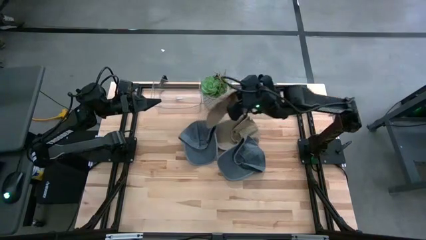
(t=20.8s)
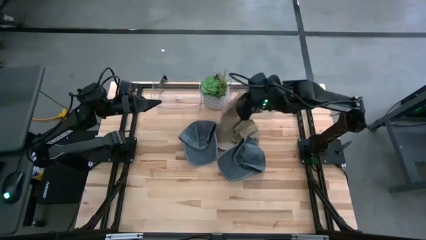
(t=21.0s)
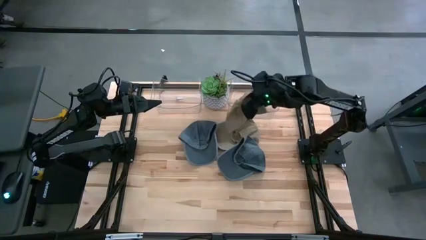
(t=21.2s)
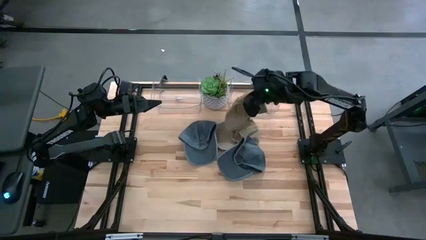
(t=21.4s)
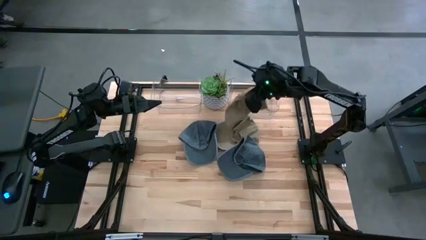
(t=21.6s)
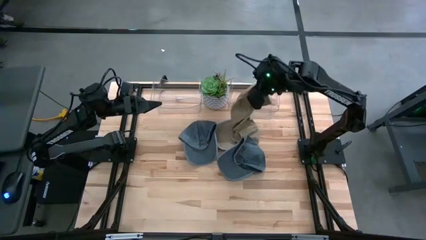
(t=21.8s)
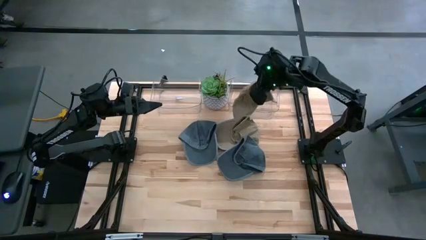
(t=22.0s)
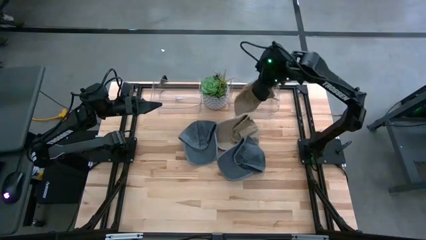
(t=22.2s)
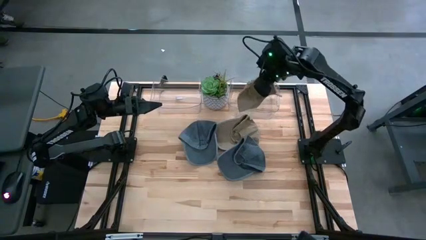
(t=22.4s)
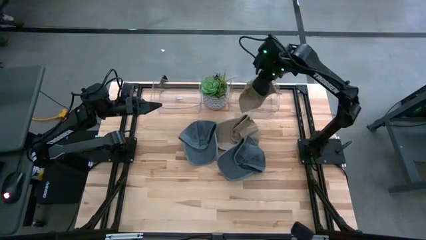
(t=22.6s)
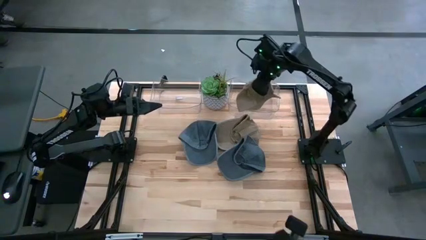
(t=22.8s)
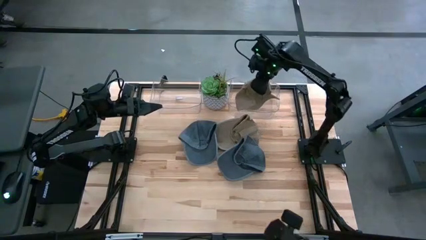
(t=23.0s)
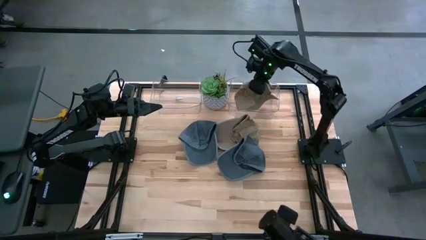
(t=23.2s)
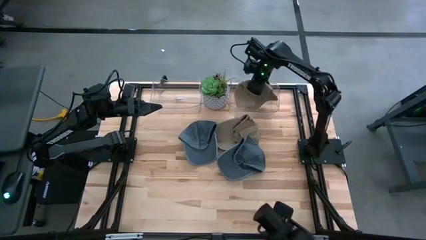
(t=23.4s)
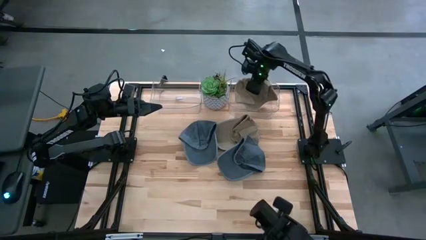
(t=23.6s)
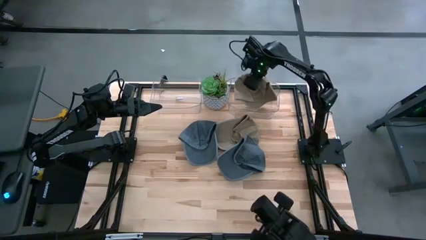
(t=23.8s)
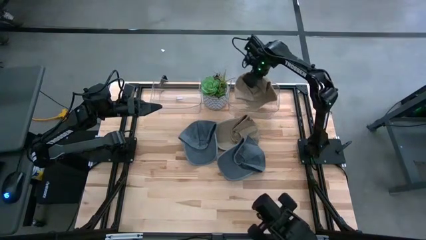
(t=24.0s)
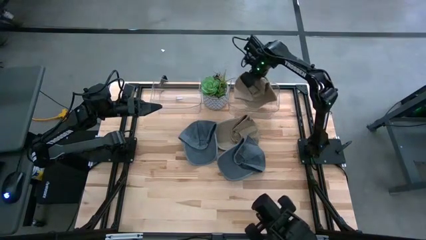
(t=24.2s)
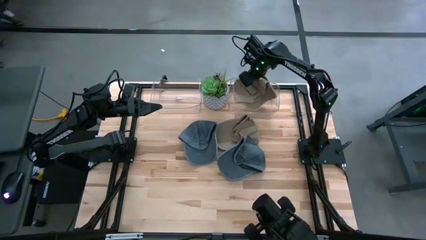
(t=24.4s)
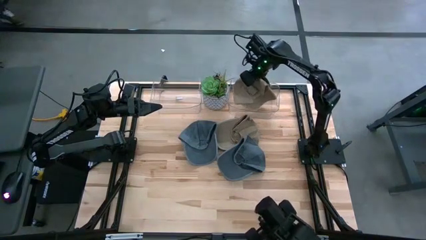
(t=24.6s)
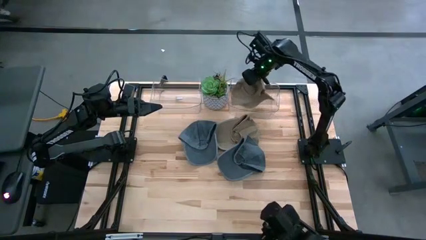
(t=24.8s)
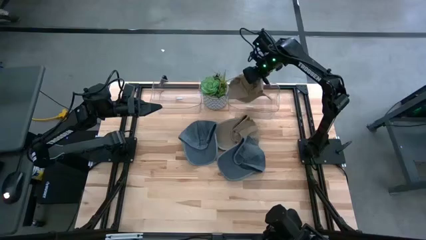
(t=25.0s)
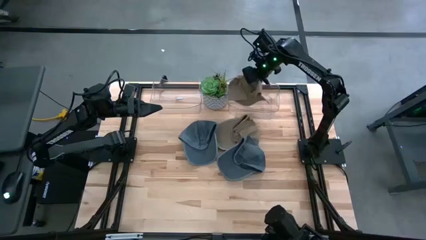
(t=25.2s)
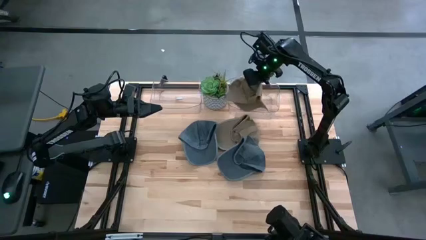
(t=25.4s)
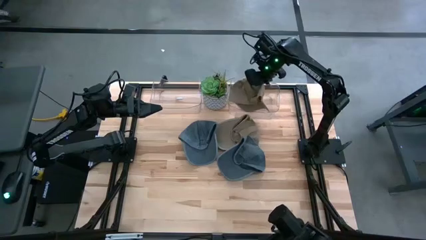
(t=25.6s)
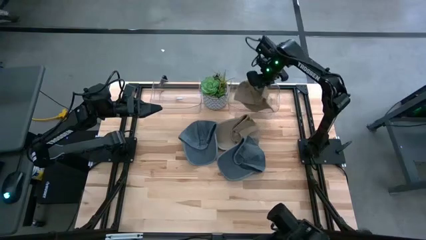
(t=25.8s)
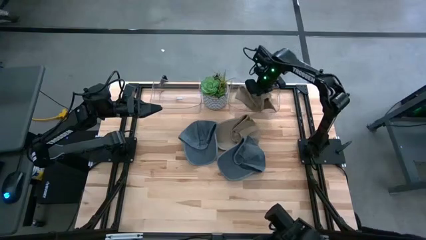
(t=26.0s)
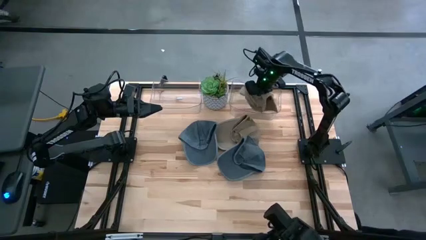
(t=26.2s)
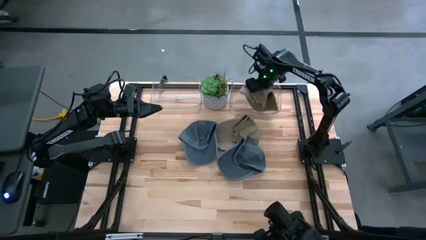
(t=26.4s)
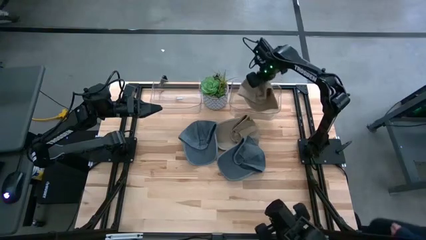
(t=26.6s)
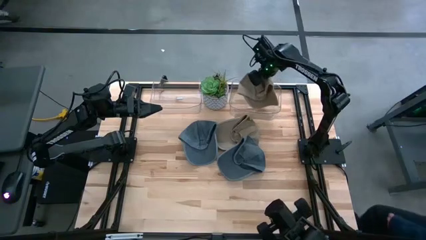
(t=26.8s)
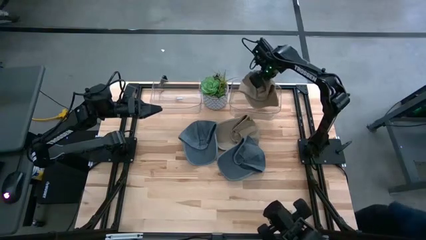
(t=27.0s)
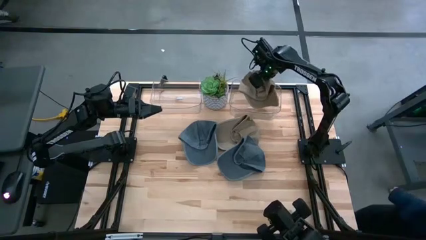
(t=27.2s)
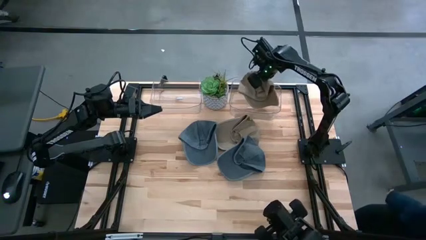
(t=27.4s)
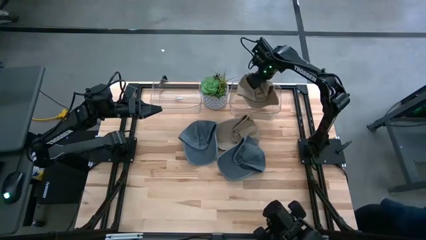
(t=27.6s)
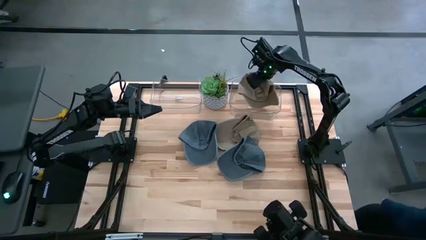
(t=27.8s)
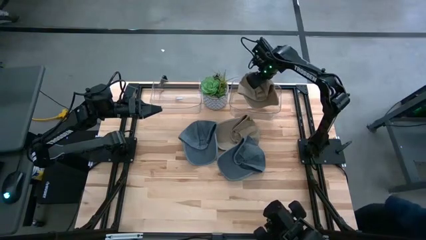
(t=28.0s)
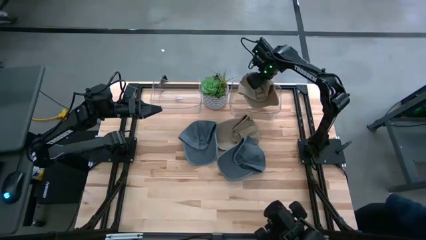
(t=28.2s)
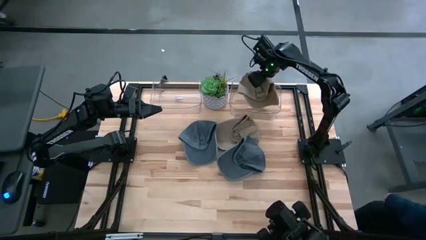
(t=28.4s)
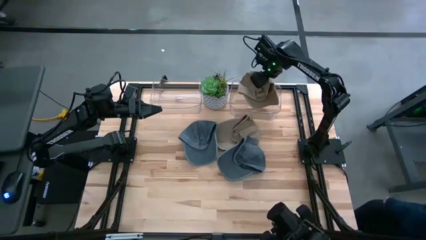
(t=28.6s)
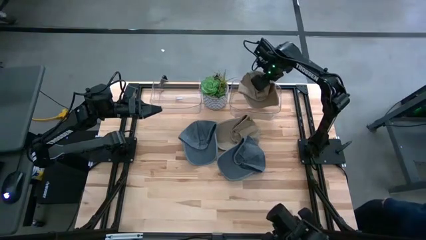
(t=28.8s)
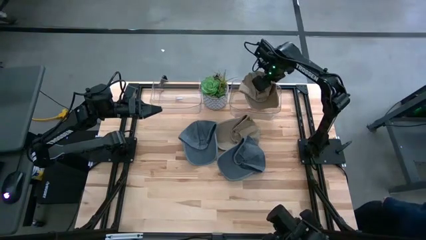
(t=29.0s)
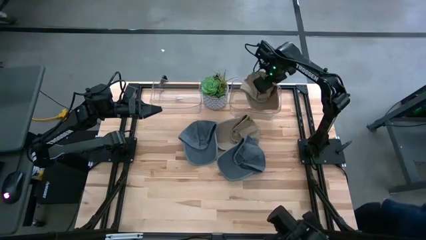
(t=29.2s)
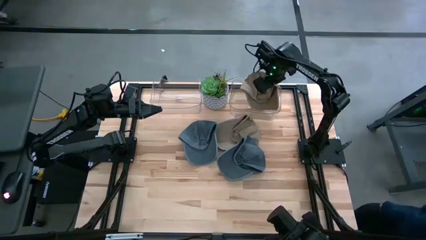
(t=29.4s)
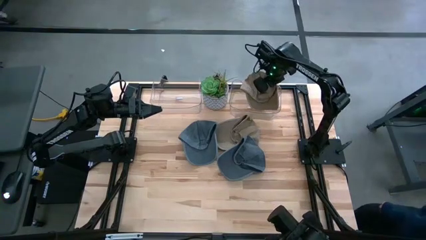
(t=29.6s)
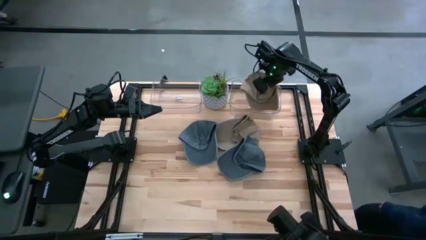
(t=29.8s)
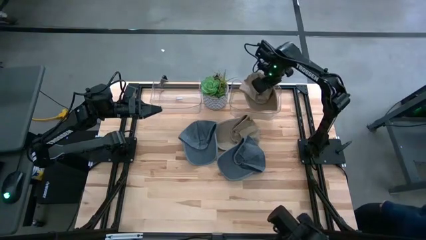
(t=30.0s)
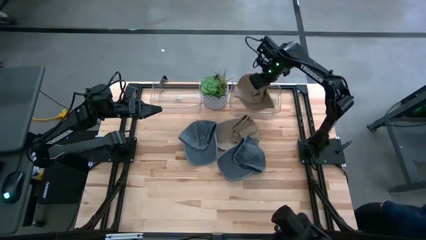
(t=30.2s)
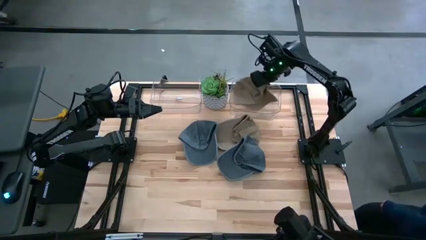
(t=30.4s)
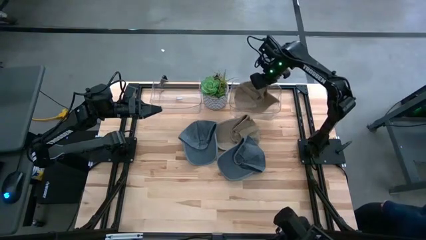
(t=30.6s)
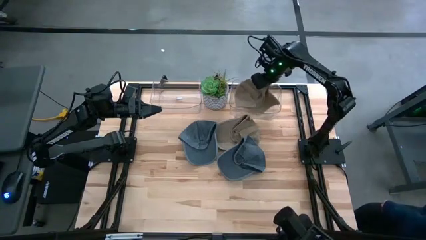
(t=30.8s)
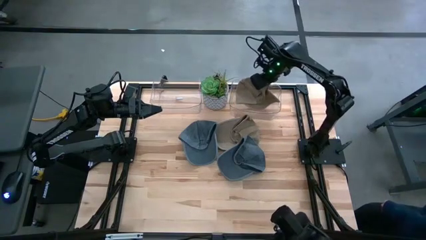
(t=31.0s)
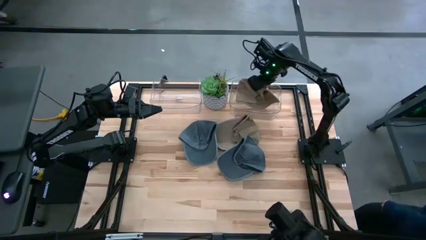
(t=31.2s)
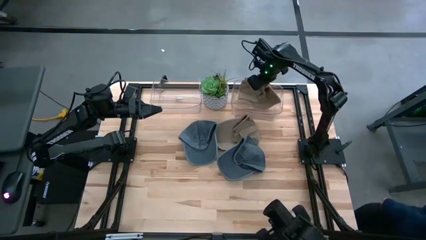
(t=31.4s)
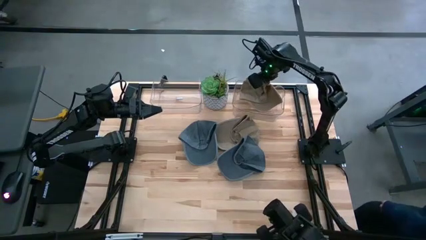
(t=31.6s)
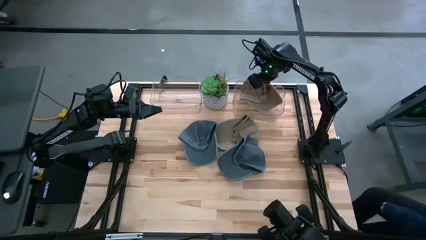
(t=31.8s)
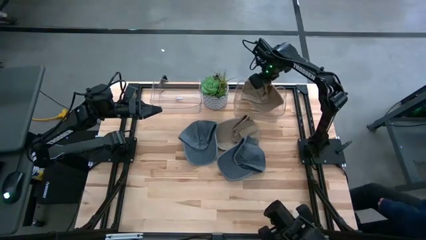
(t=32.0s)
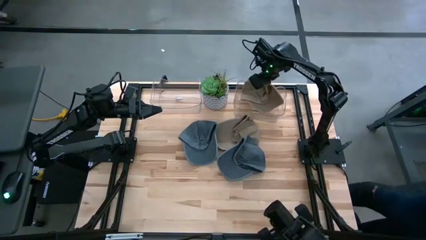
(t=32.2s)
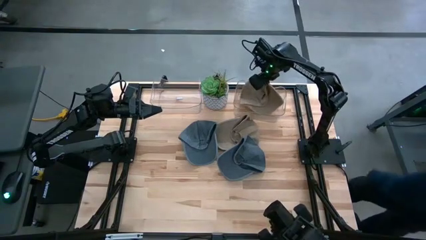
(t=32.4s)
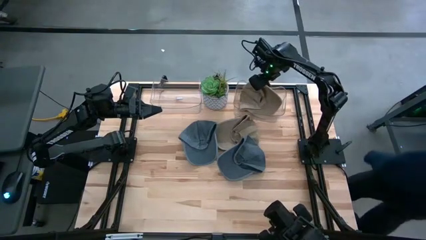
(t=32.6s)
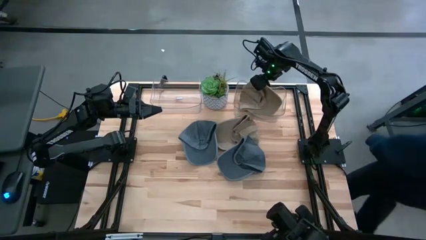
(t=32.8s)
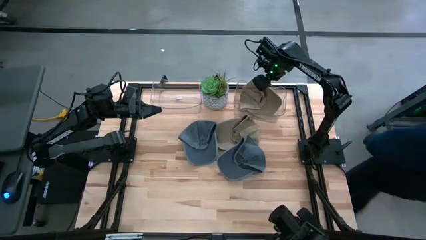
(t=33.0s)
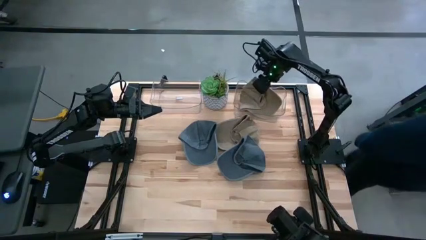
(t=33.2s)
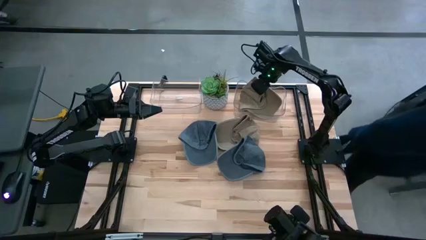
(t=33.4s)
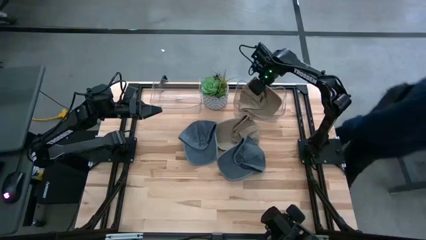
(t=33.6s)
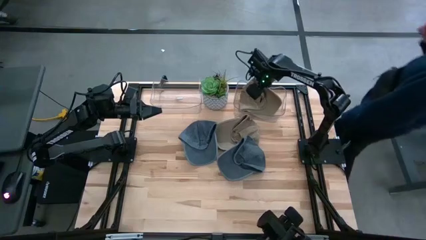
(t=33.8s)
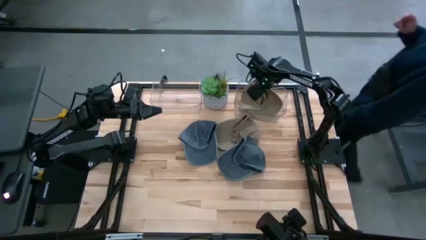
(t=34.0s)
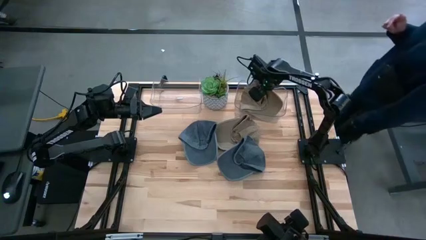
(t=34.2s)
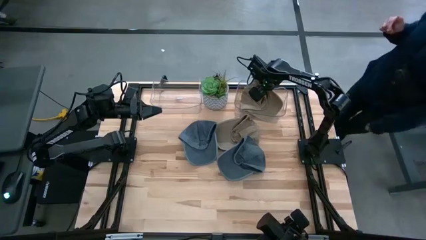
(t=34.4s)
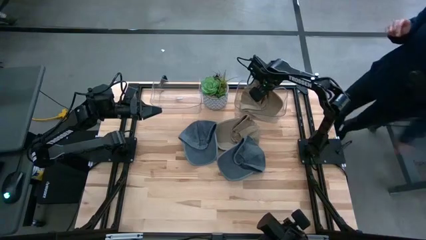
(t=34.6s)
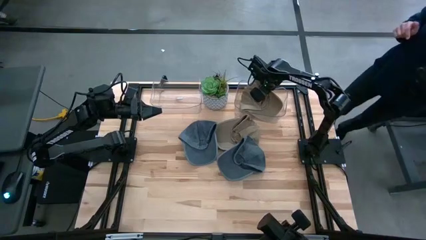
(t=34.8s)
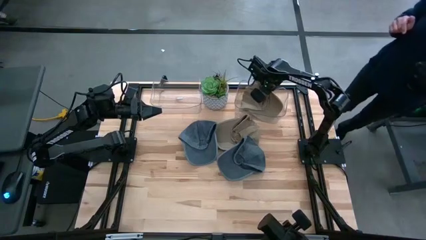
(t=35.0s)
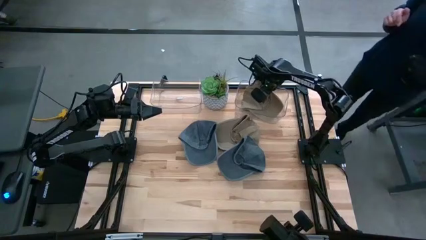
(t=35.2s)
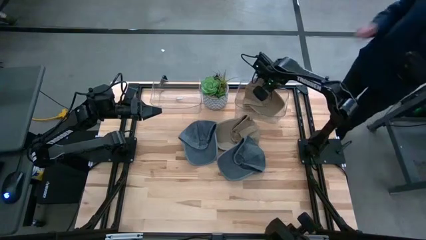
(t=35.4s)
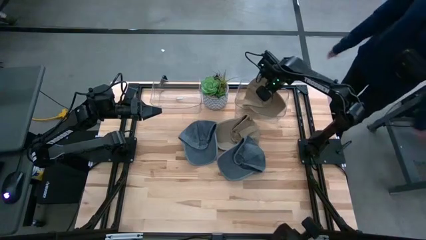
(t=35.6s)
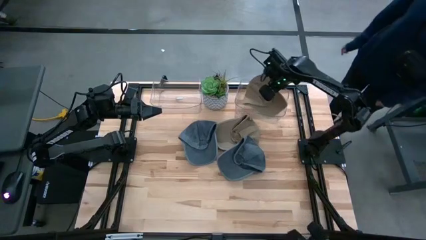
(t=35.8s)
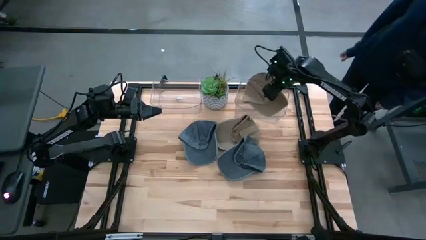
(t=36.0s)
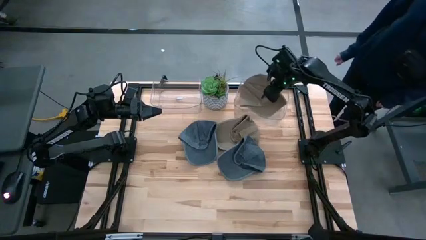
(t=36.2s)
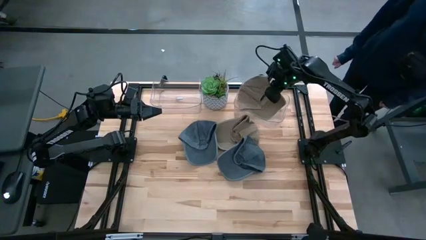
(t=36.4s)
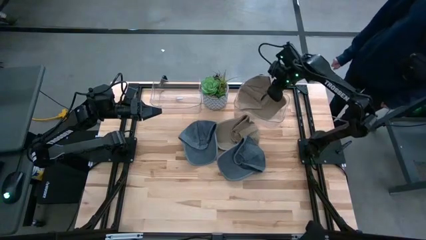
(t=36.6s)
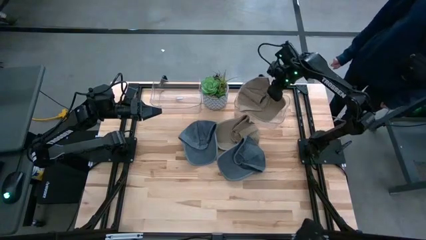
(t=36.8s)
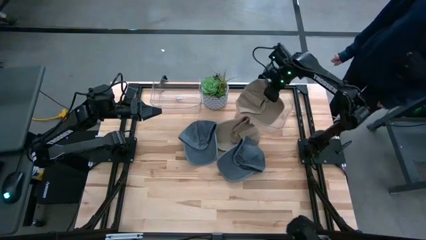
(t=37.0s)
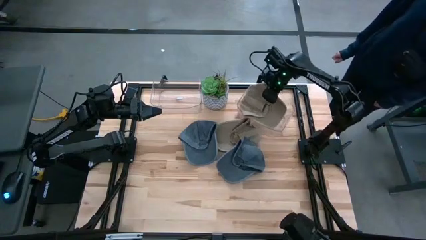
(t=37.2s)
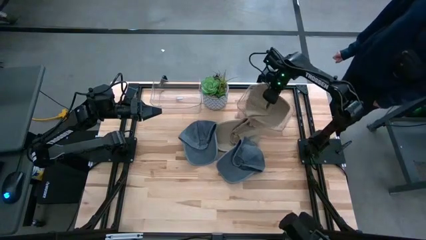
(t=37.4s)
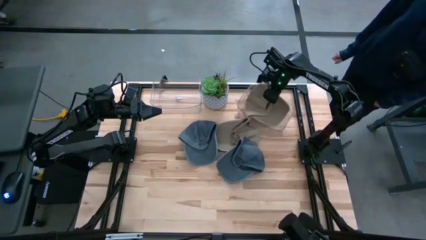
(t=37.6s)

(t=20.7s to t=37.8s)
Task: Pick & Place hat
Put the left light brown cap into the right transparent bin
